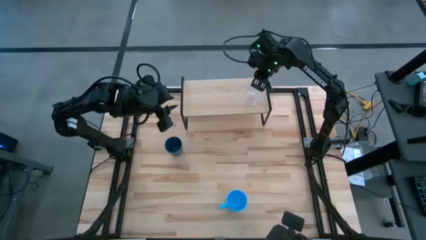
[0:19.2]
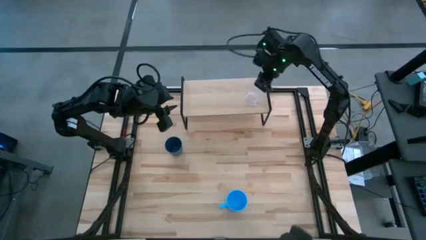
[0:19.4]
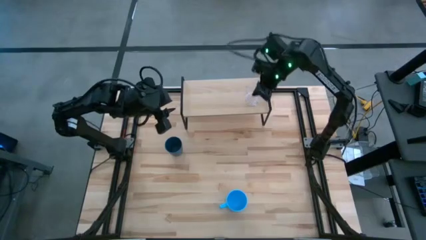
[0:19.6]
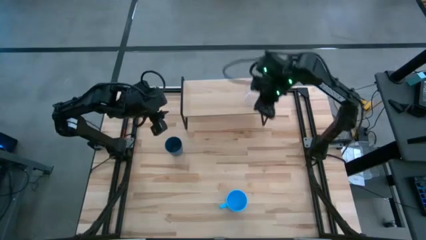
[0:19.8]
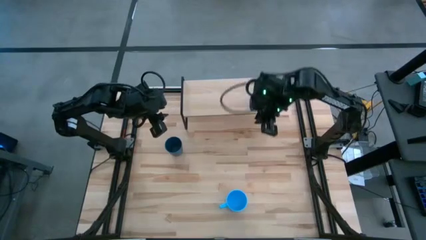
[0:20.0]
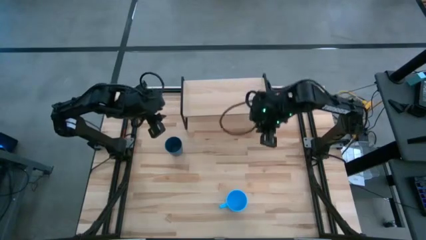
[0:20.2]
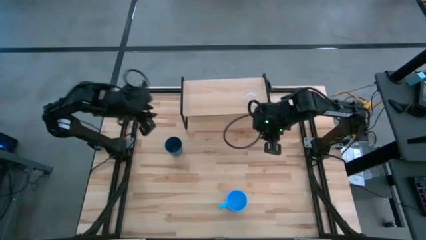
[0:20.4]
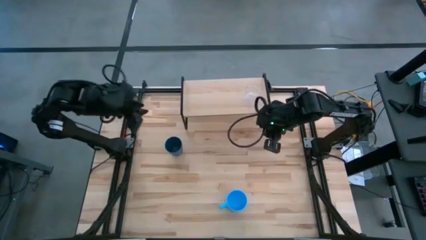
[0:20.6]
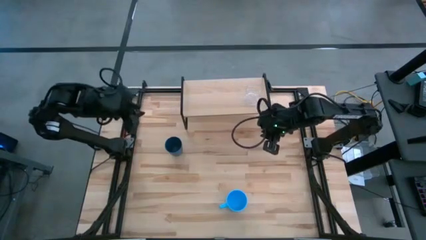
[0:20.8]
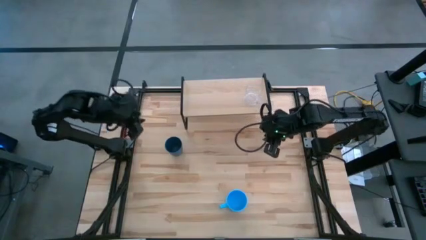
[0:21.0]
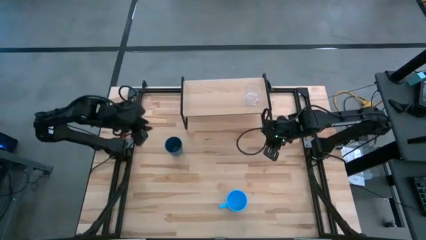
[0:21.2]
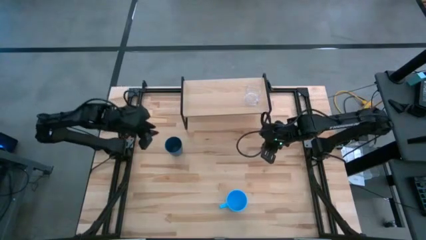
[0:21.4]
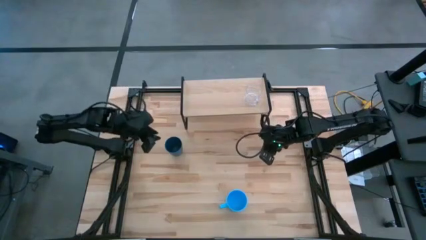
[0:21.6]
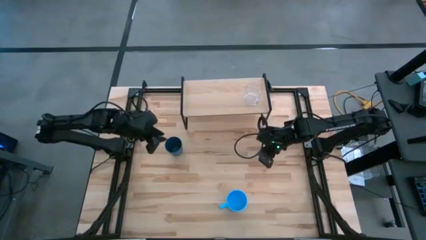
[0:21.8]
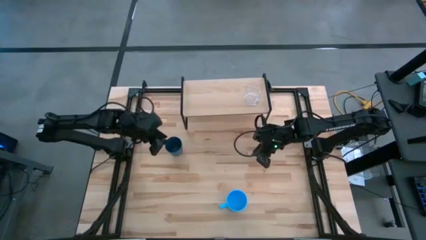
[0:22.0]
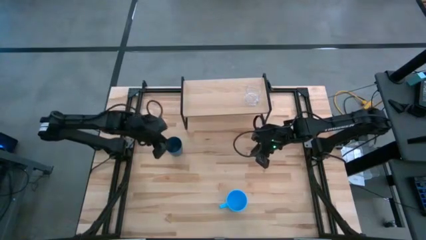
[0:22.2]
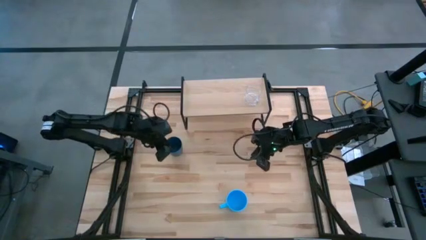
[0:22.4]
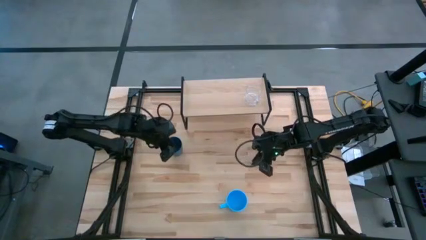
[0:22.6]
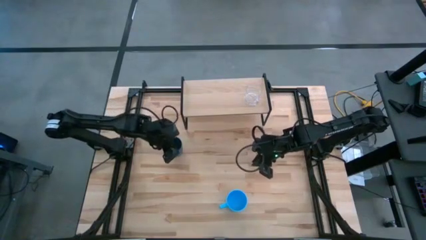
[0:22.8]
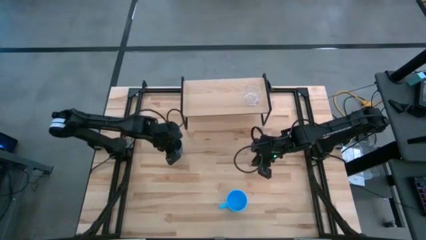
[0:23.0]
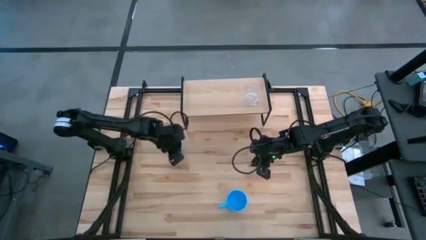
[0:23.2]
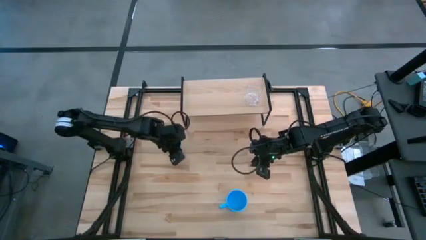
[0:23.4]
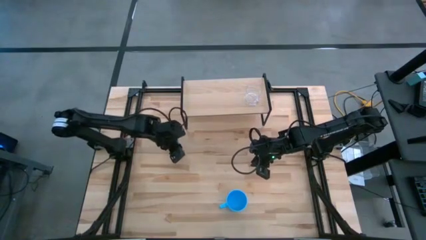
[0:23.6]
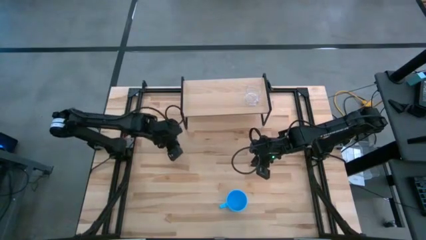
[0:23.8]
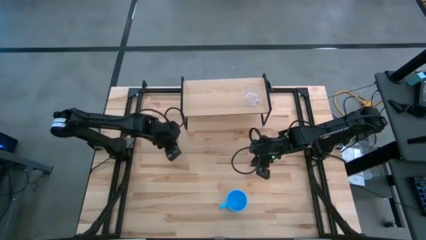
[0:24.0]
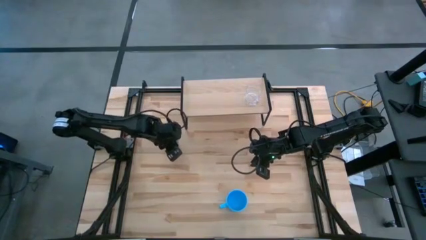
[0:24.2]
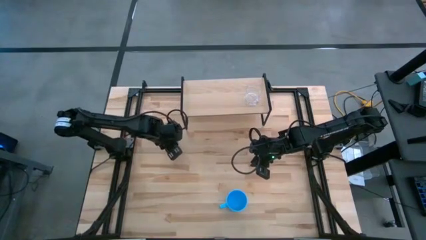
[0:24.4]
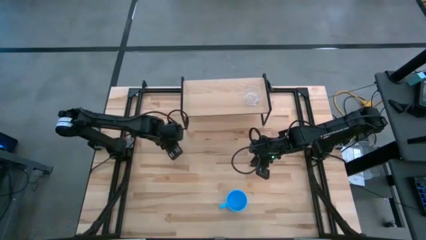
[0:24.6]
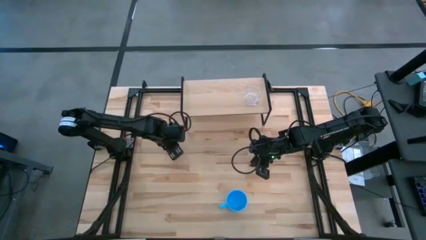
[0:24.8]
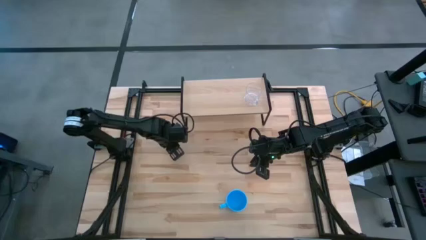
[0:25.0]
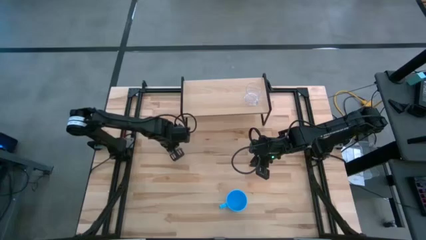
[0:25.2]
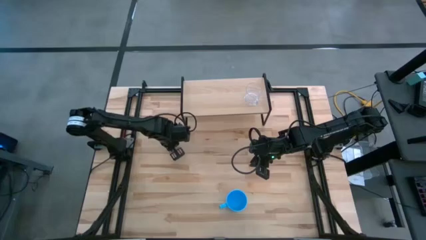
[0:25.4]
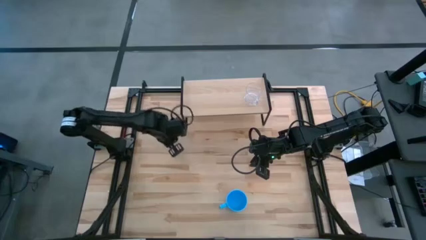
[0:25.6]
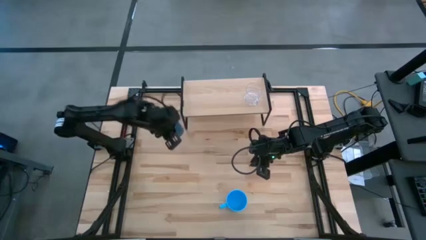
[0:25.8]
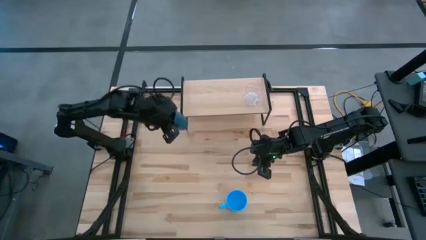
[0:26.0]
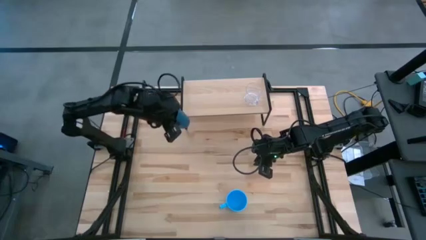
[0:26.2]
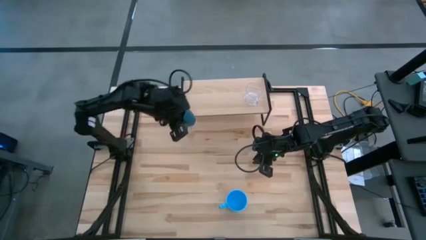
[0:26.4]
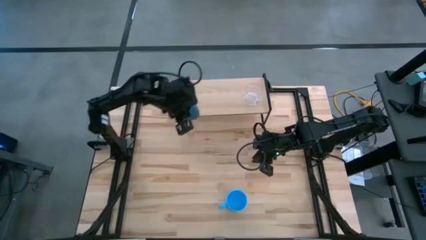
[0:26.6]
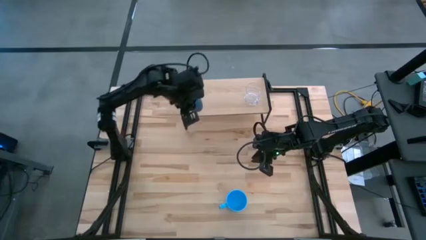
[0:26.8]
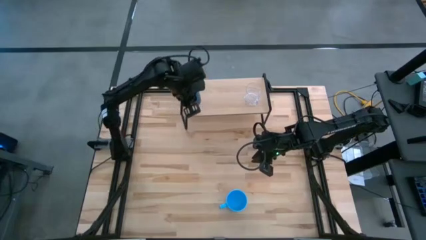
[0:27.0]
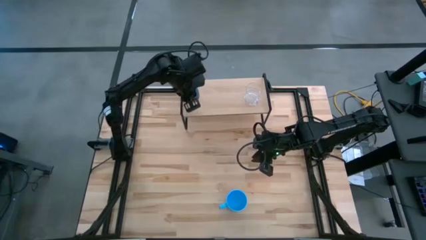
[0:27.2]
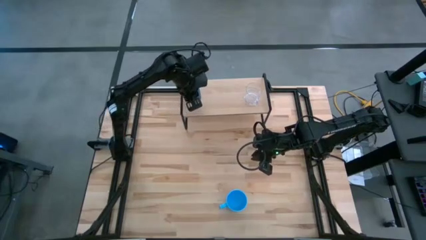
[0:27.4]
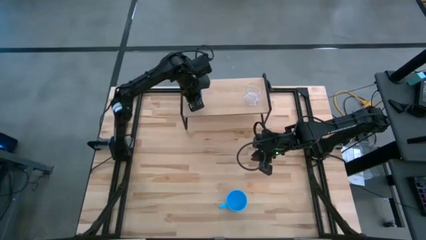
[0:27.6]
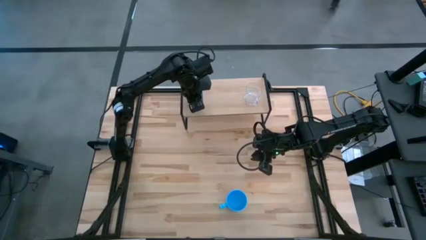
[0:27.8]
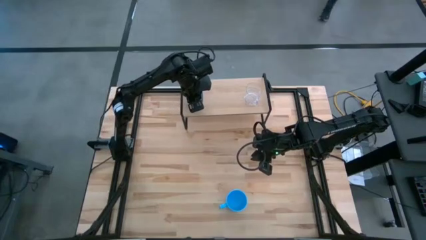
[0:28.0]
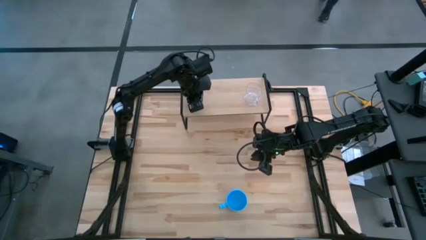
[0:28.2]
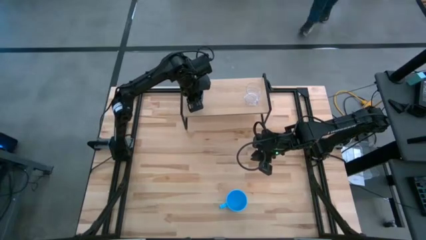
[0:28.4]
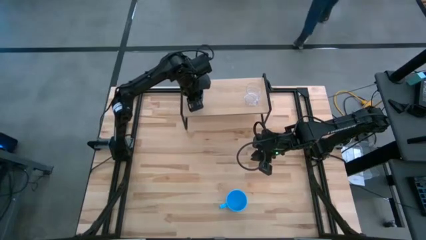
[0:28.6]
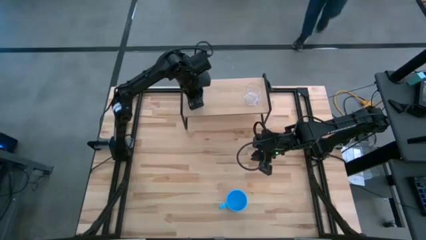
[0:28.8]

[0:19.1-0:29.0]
Task: Stack small to large cups/mugs on shelf
Put the blue cup on the shelf

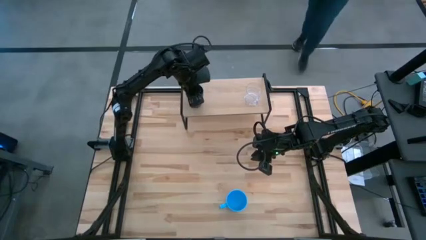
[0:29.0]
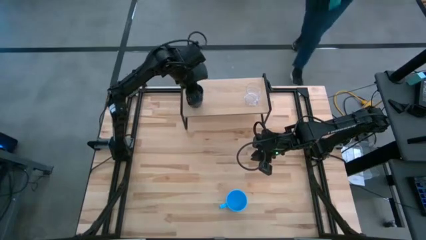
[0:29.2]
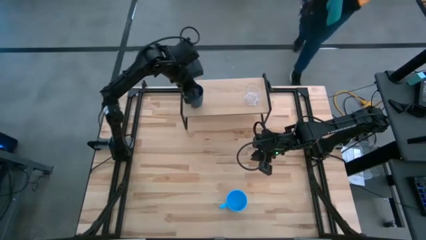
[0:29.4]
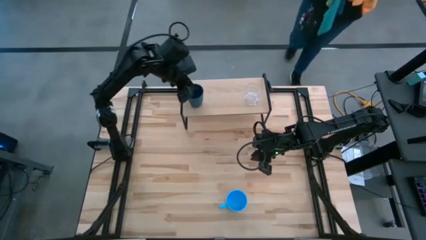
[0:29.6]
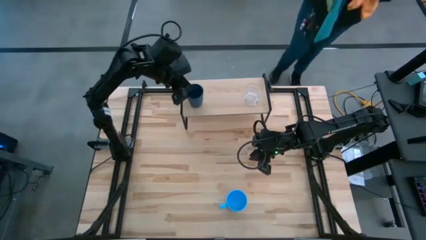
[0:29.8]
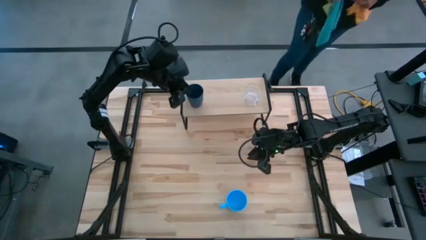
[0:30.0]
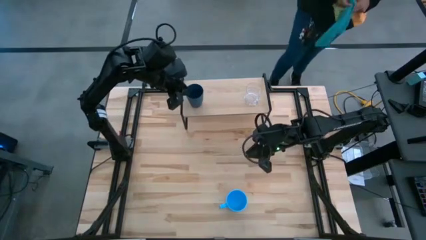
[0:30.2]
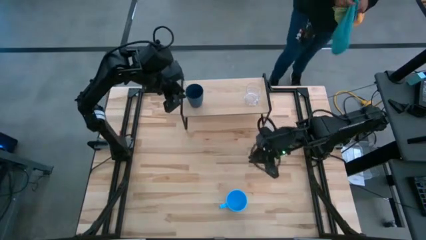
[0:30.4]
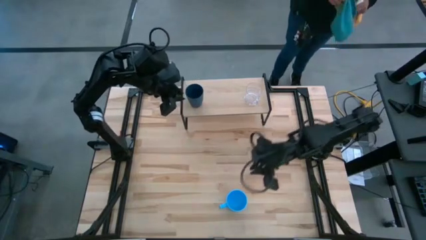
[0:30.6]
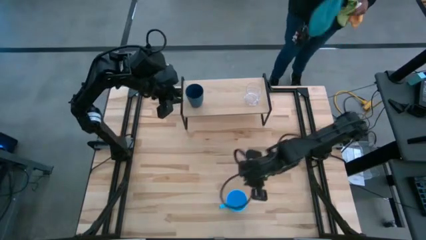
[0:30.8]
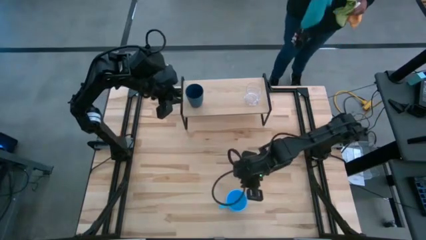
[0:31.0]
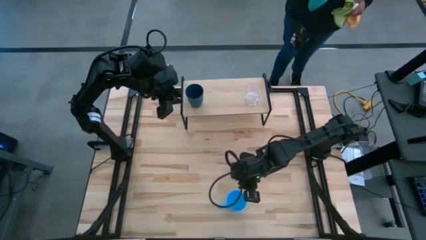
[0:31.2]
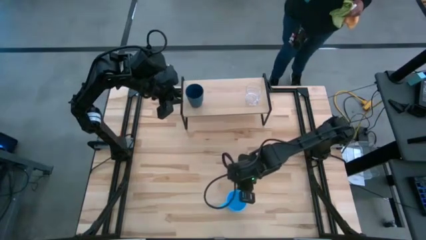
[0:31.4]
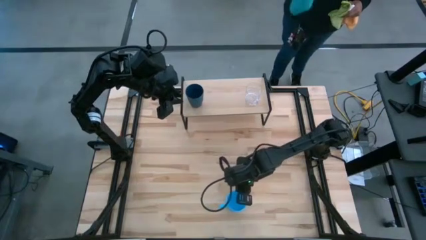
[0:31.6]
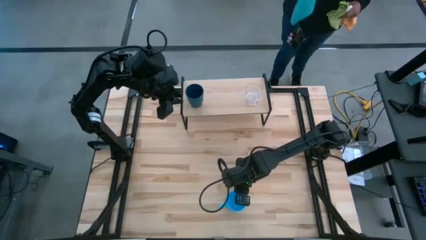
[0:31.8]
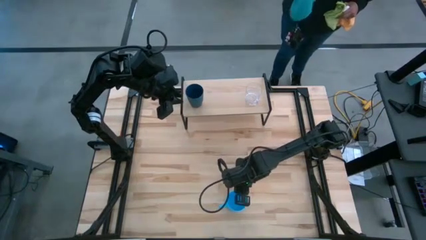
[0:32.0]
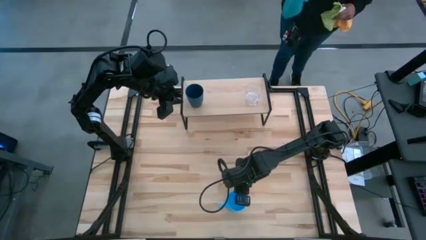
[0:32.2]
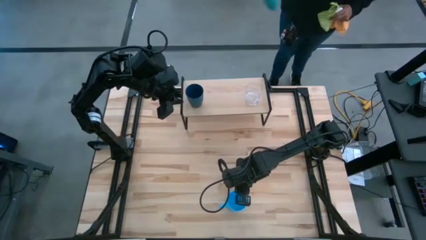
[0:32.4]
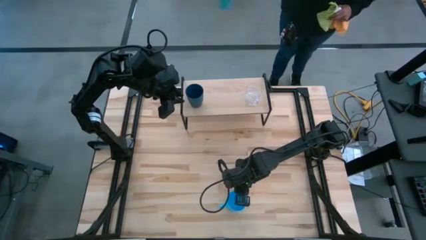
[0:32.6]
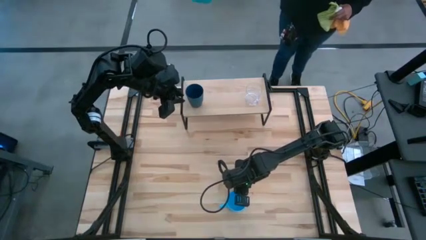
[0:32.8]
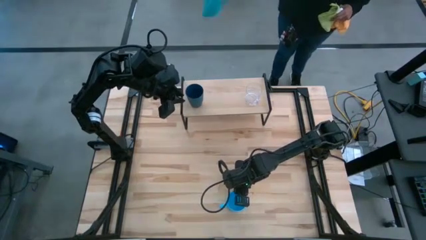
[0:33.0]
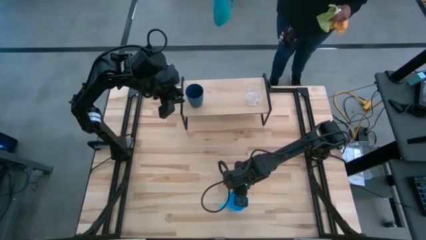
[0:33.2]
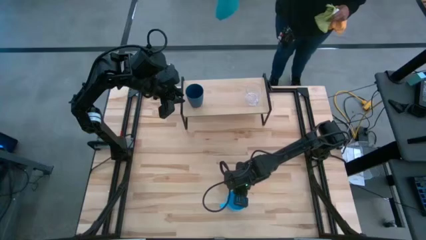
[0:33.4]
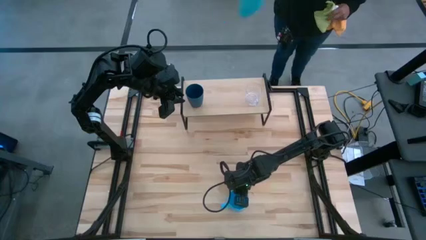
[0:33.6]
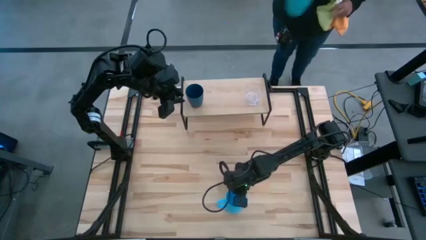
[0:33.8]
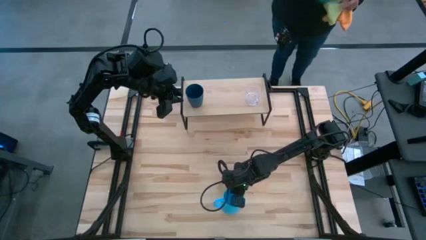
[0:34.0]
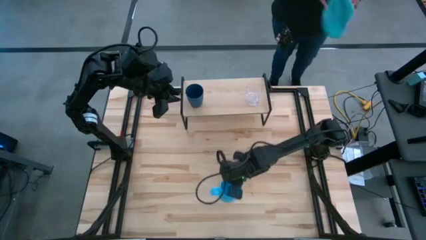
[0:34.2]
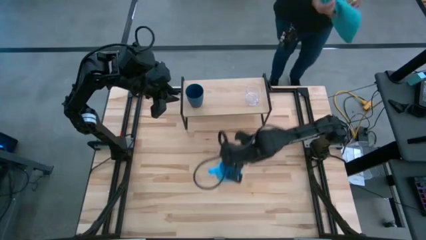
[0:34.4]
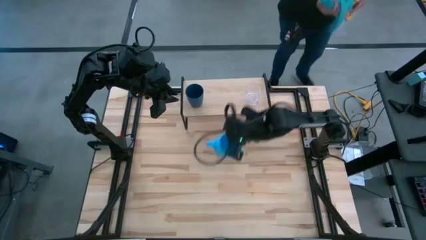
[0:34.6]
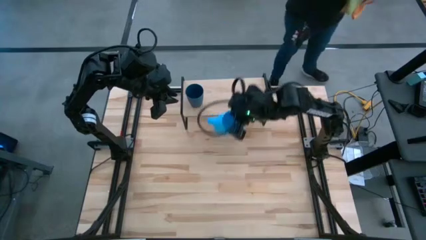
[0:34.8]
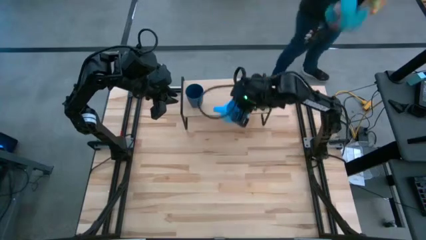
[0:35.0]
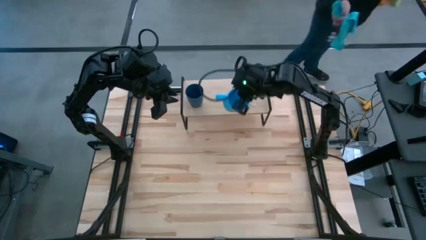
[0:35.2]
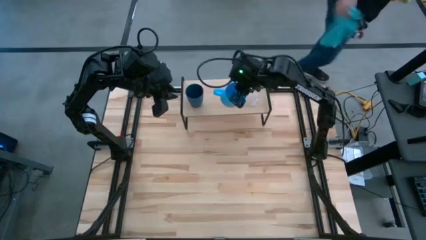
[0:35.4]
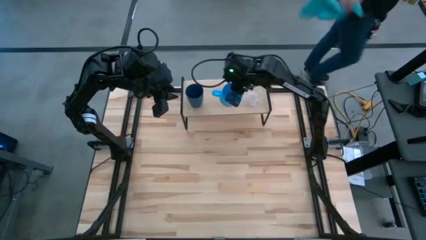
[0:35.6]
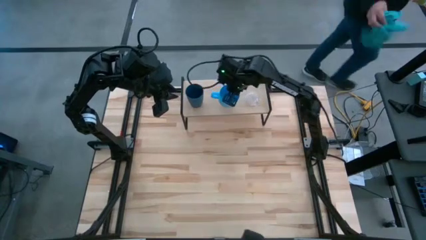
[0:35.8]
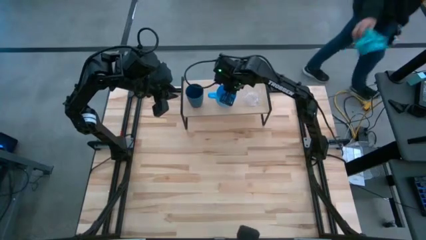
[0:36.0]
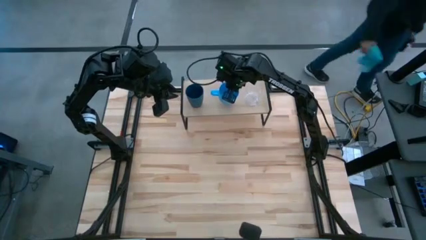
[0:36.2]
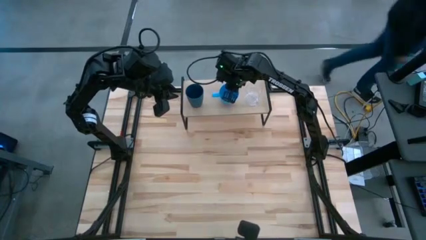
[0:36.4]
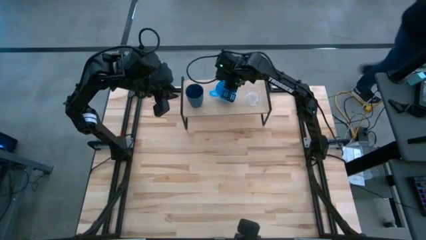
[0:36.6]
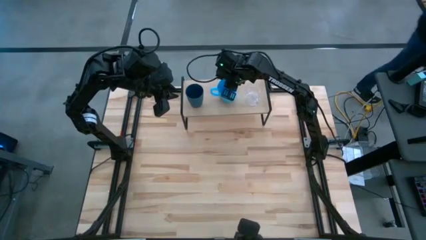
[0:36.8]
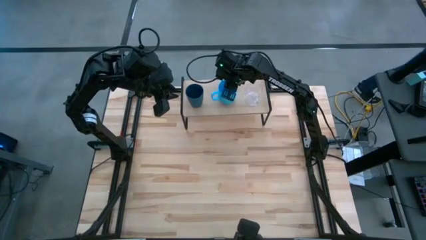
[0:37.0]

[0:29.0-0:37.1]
Put the light blue mug on the shelf
